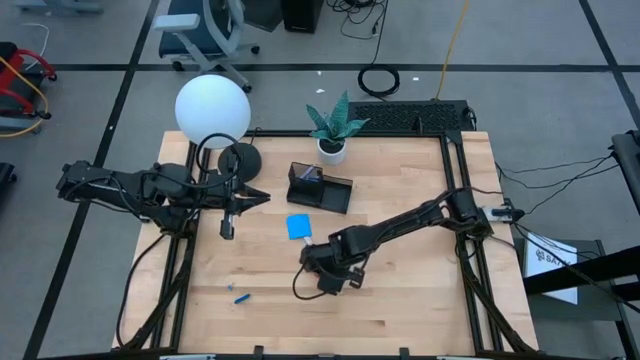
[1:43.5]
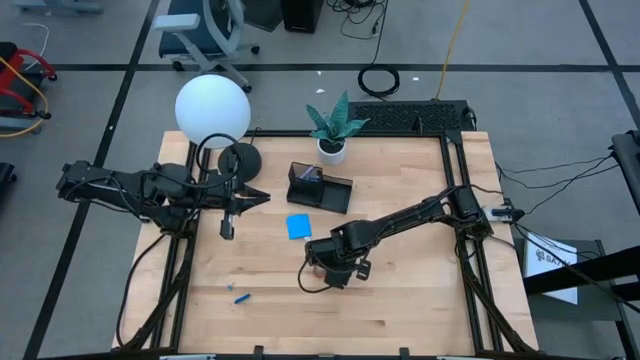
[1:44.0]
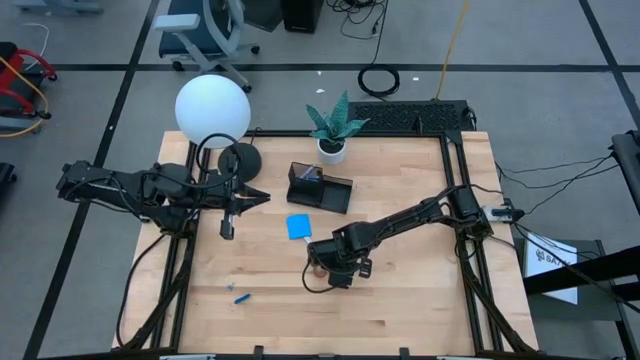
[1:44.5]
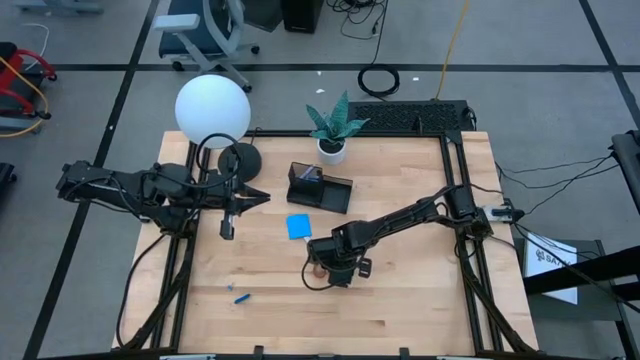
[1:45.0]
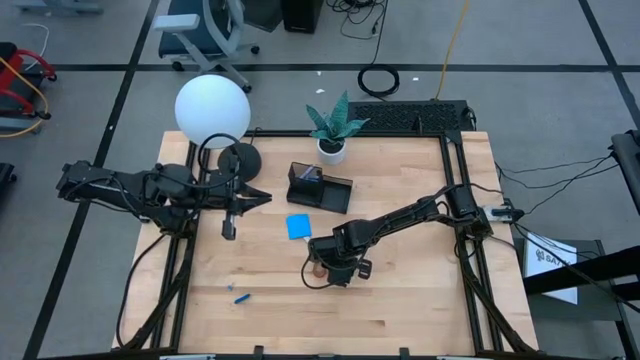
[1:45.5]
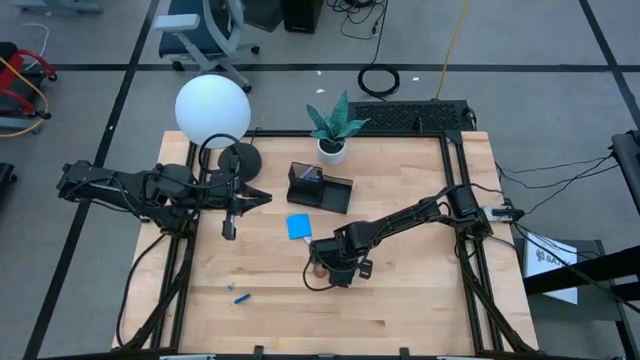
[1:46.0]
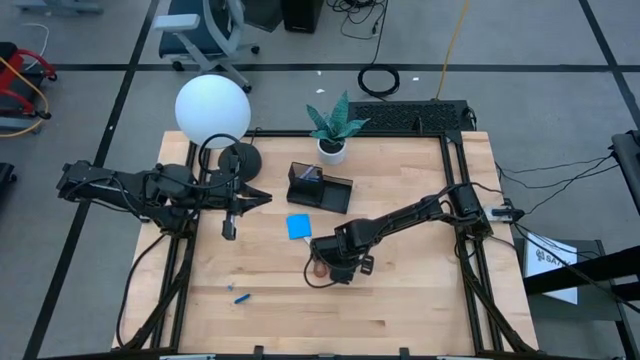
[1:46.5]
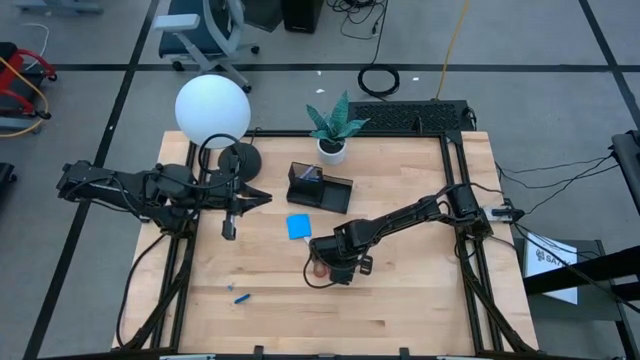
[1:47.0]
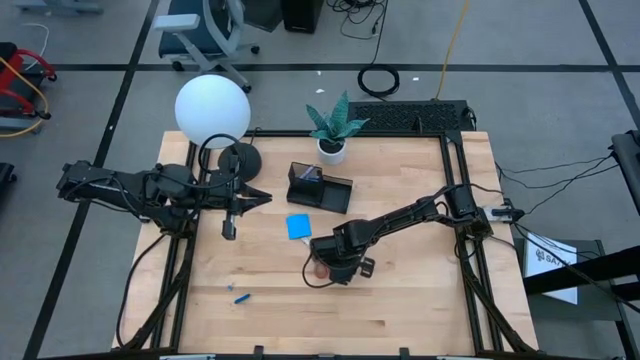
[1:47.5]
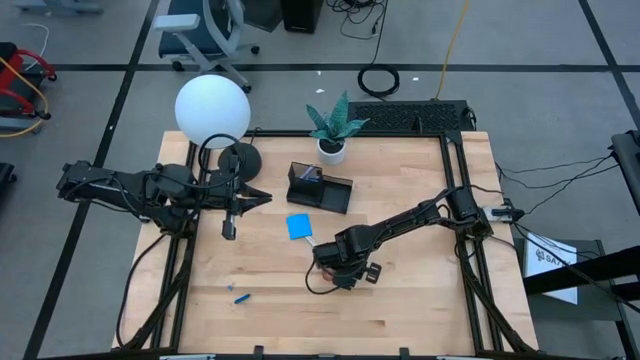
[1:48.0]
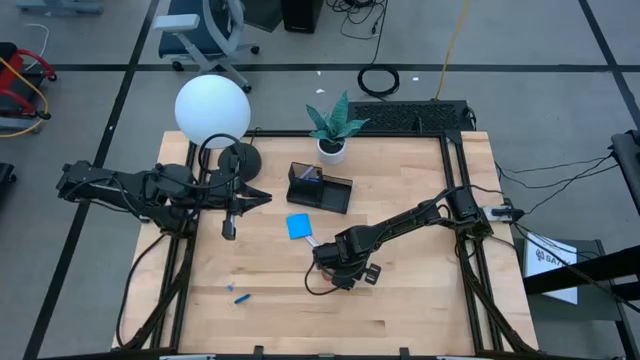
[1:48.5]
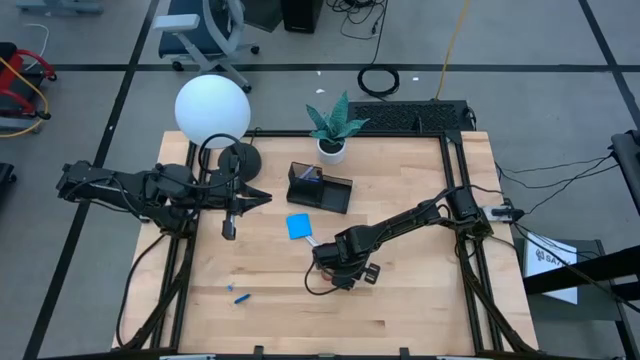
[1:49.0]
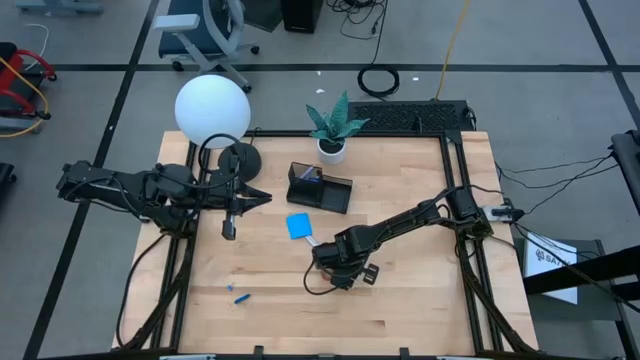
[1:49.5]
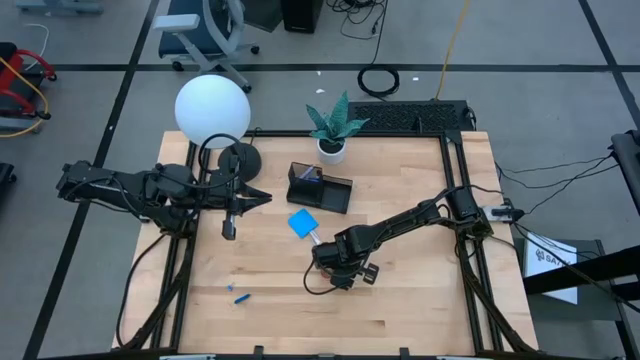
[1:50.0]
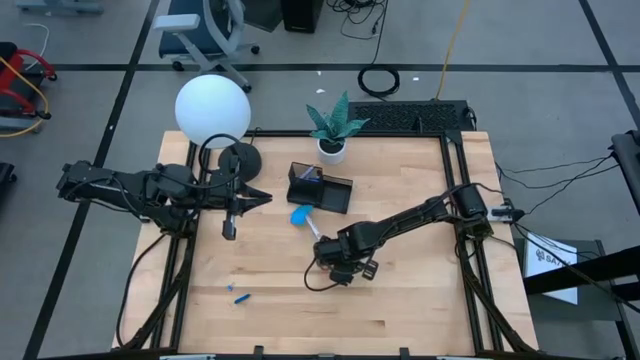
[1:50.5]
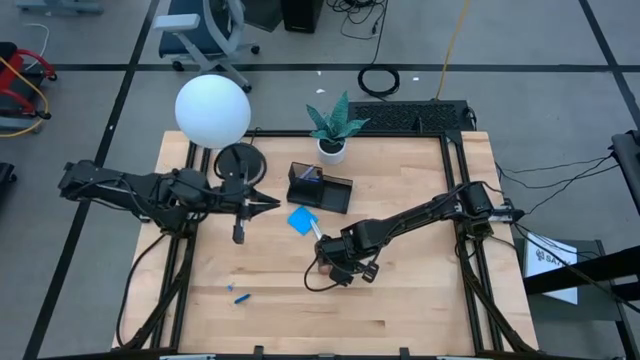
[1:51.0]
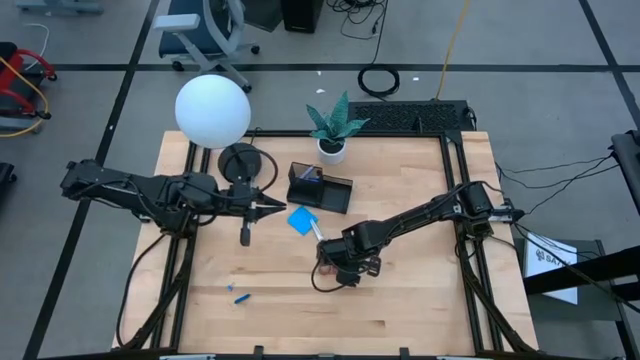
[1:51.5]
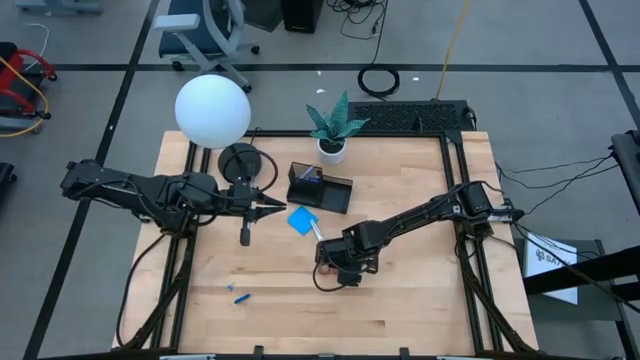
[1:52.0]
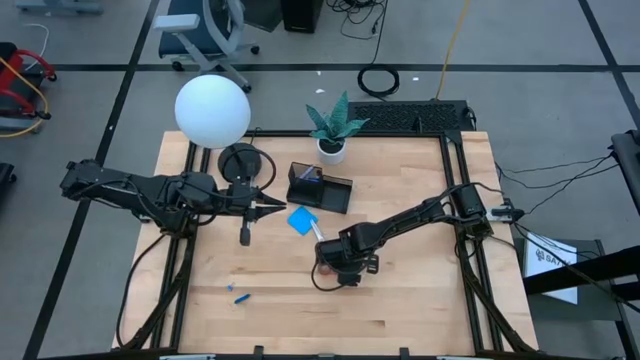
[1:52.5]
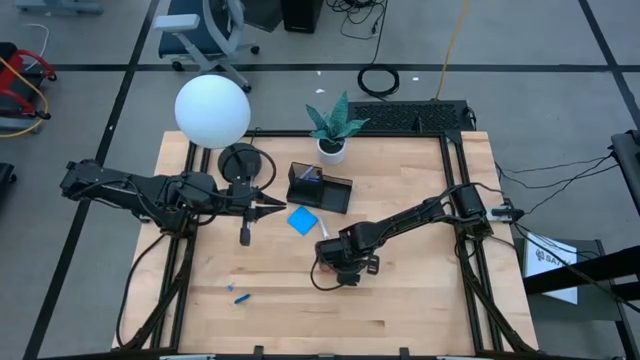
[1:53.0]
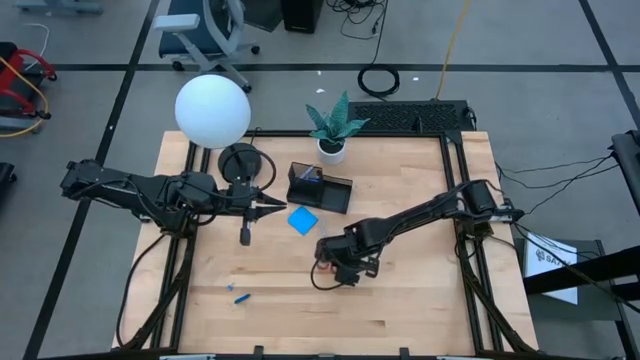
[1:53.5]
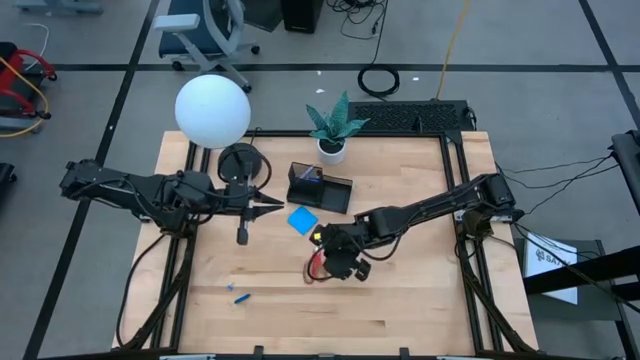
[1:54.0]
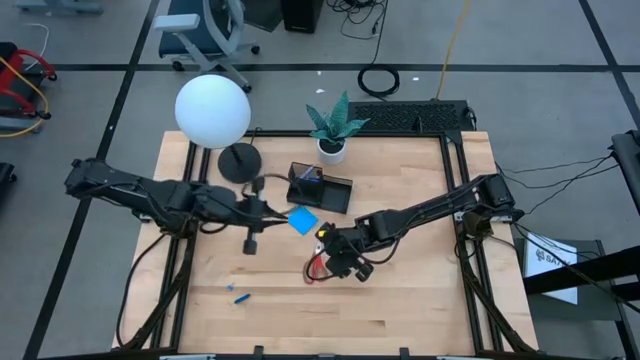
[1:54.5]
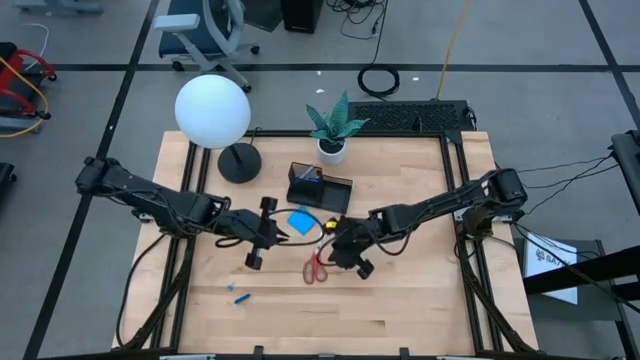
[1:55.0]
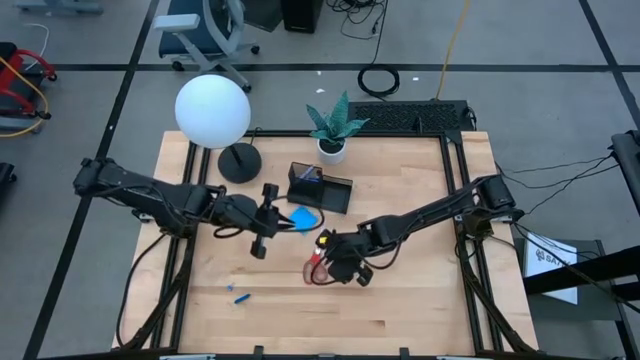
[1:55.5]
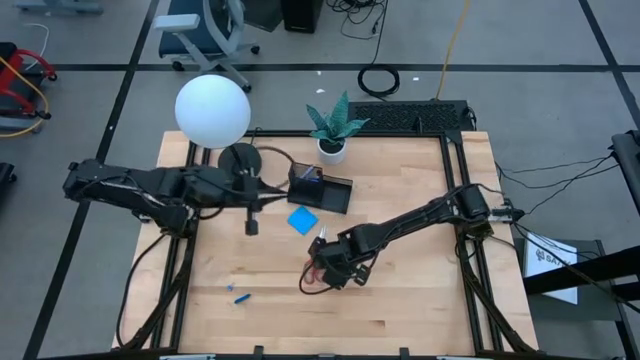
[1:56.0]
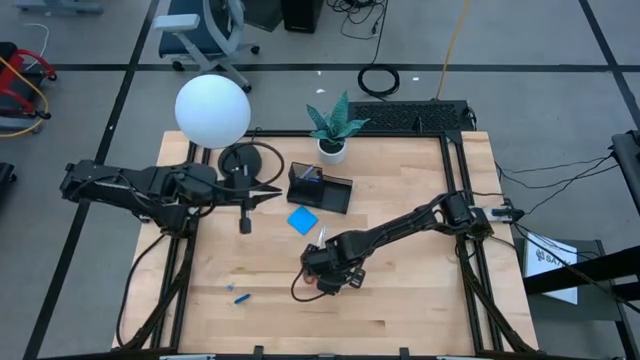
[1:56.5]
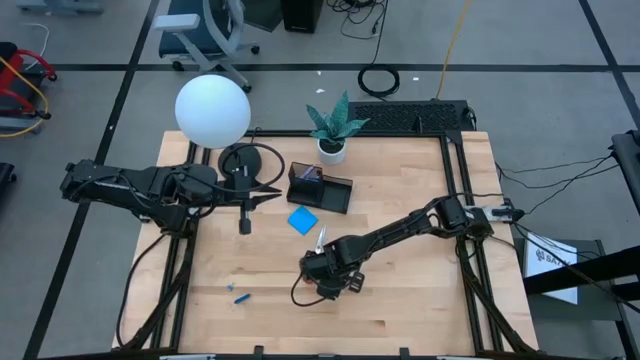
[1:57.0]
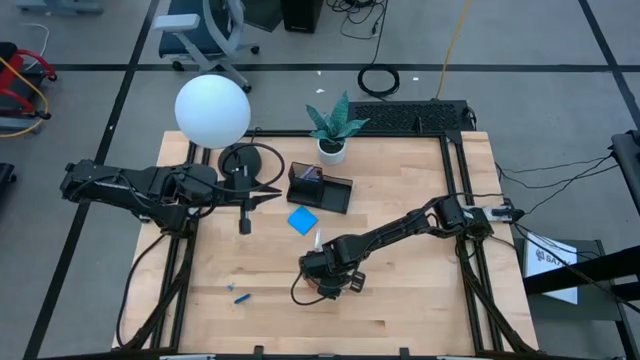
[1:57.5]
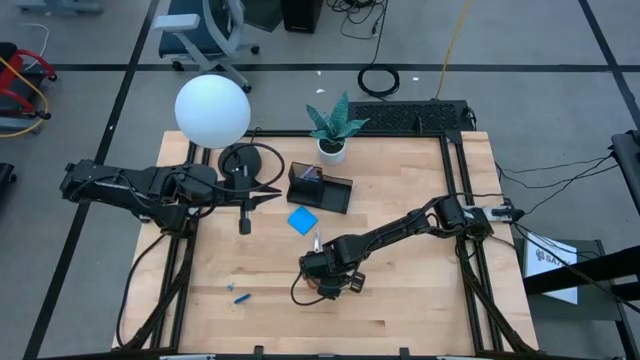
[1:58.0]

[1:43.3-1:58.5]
Task: Pick and place office supplies into organizer
Put the red scissors into the desk organizer

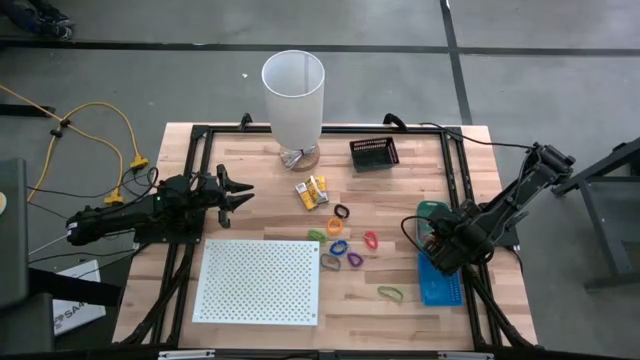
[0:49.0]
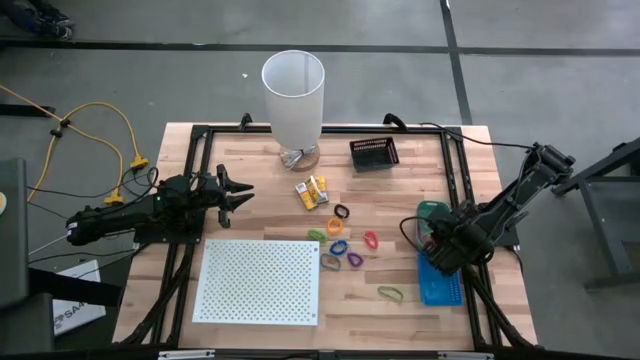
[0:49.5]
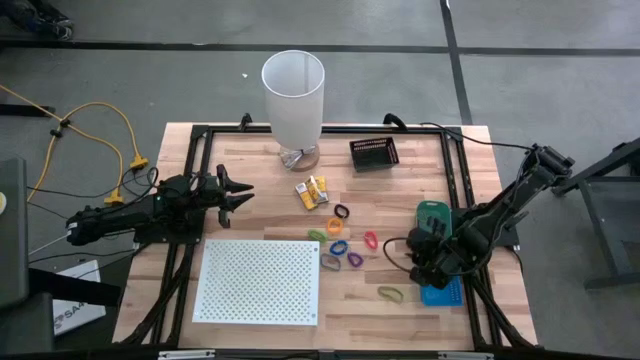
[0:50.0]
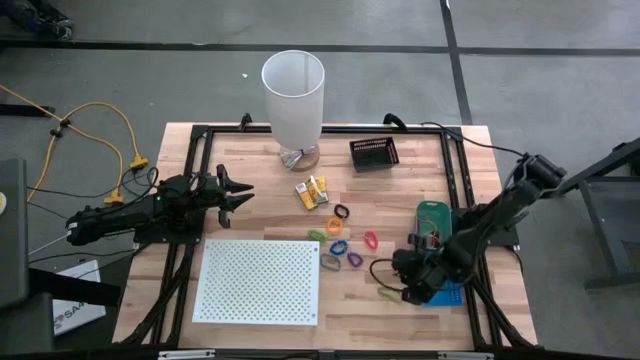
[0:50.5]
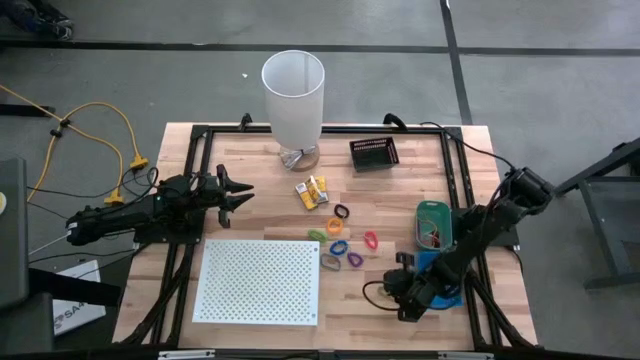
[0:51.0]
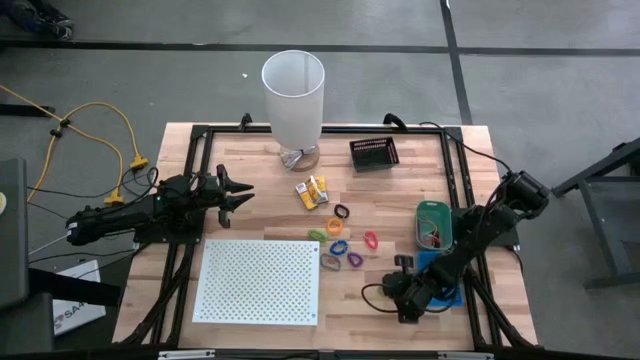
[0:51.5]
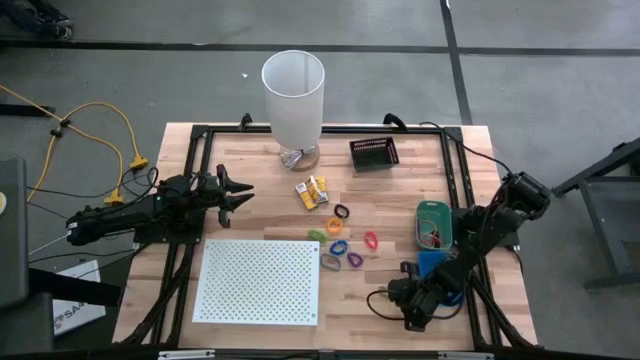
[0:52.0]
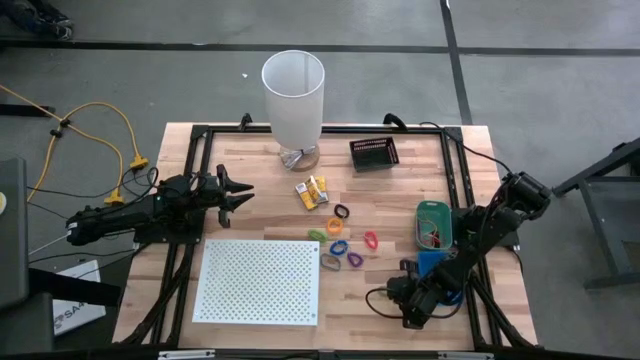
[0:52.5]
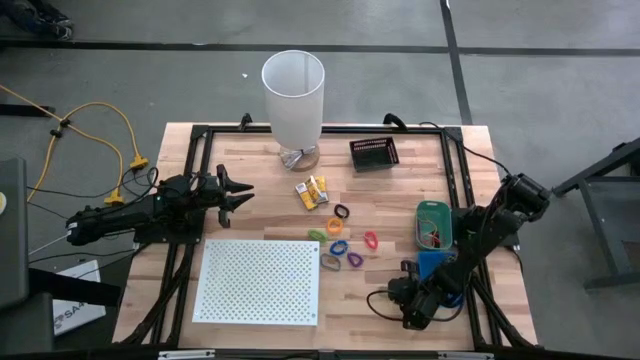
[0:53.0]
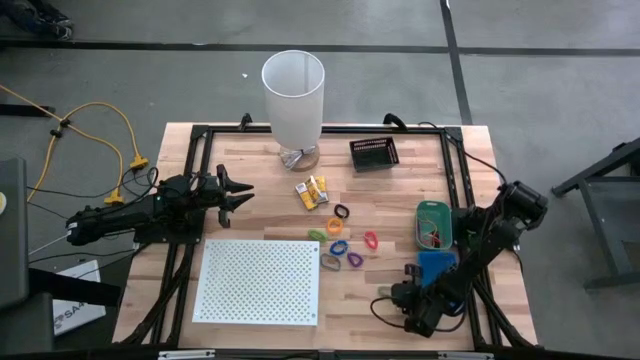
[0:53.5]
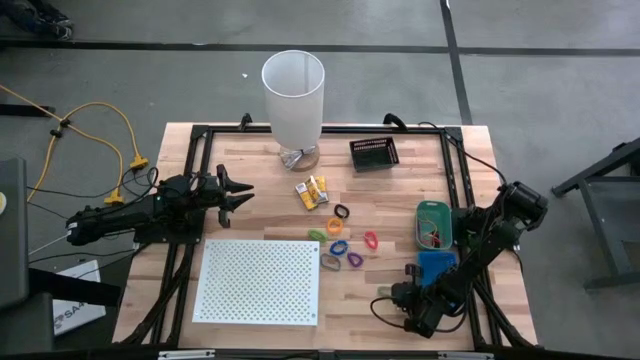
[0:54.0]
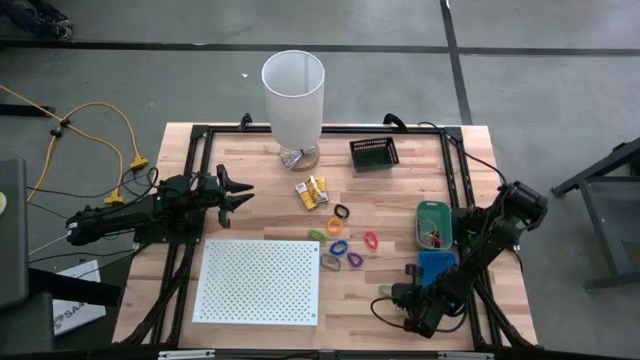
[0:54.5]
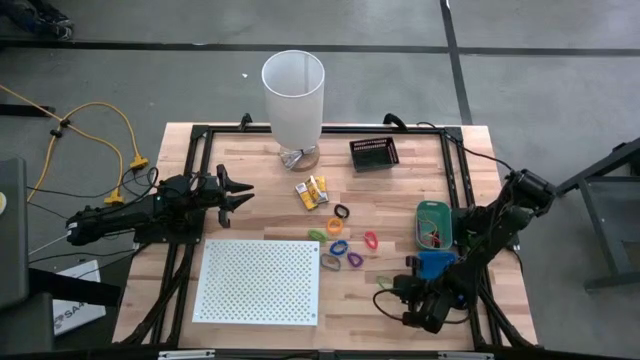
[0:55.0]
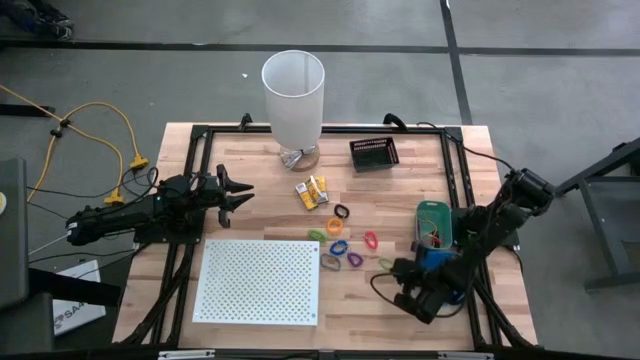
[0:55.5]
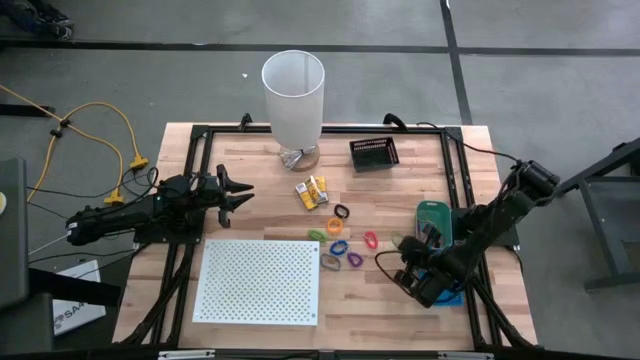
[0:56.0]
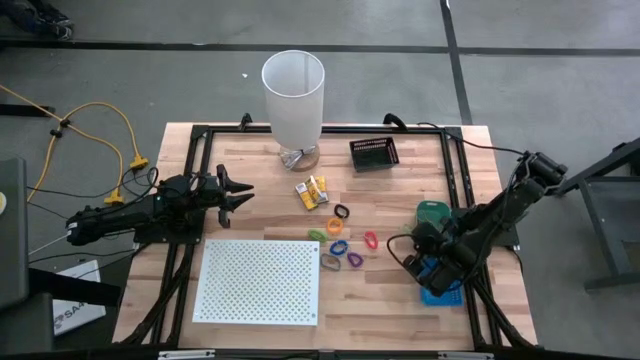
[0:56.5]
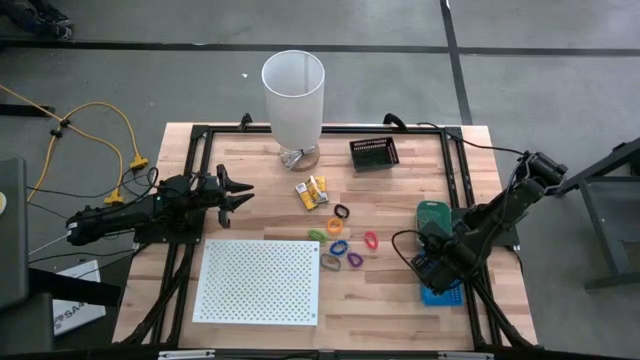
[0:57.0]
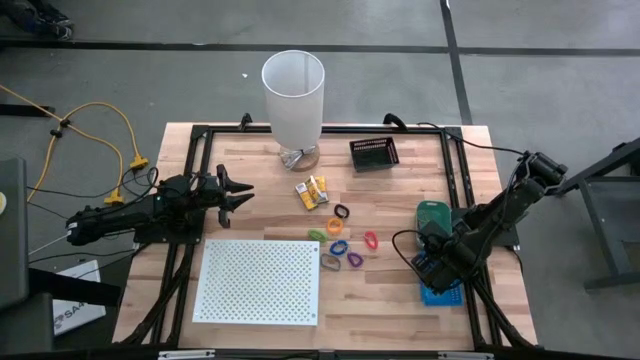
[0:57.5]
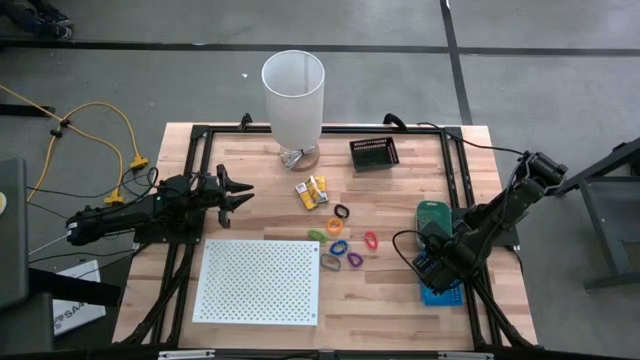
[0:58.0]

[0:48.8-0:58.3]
Task: Pick & Place Office Desk Supplies
Put the green rubber band into the green bin
